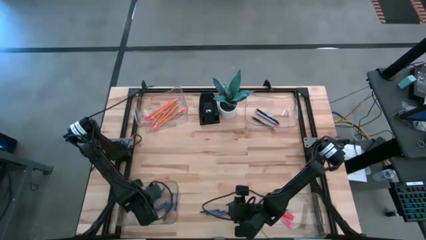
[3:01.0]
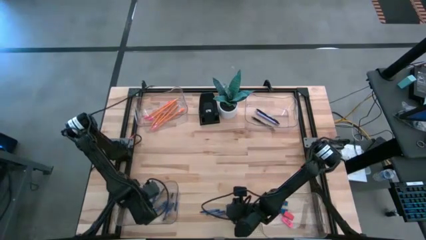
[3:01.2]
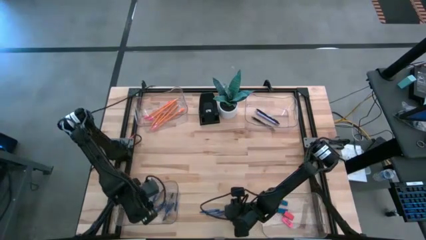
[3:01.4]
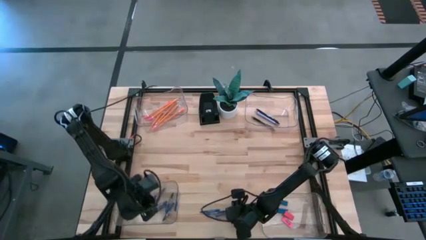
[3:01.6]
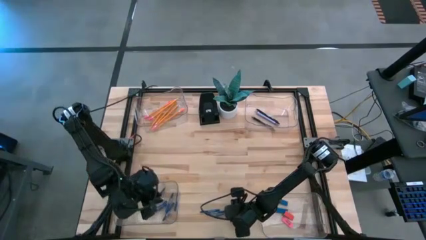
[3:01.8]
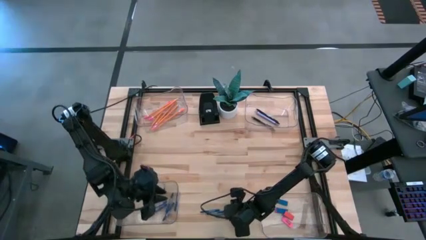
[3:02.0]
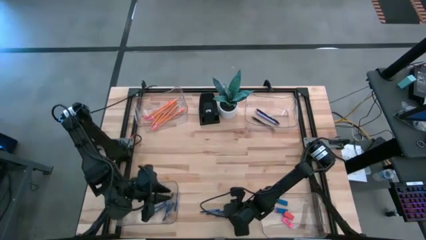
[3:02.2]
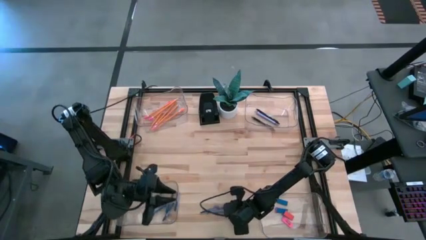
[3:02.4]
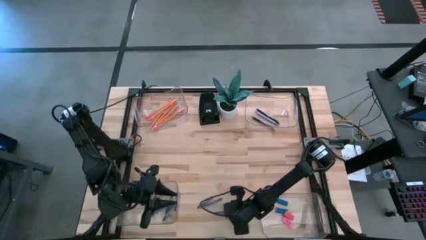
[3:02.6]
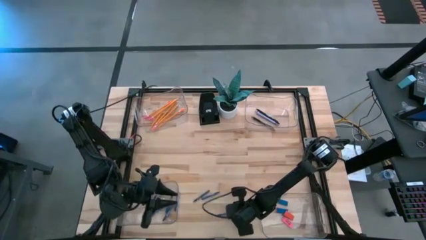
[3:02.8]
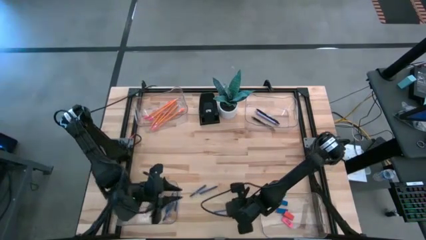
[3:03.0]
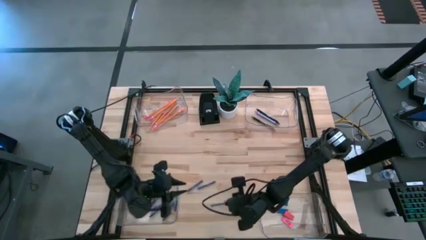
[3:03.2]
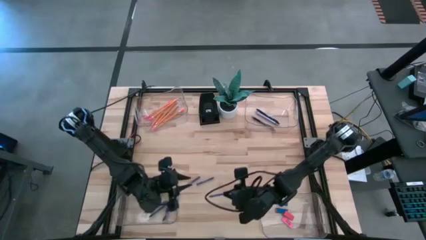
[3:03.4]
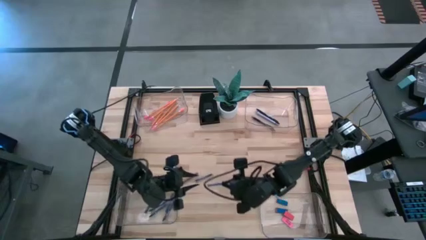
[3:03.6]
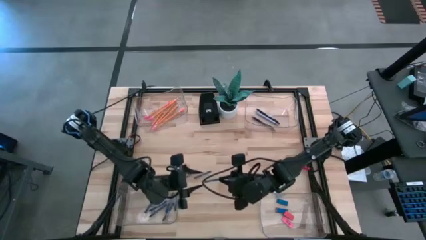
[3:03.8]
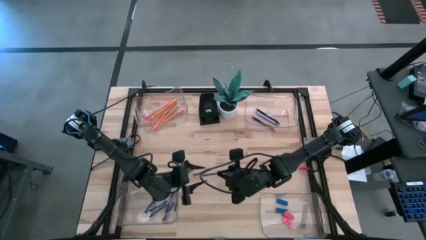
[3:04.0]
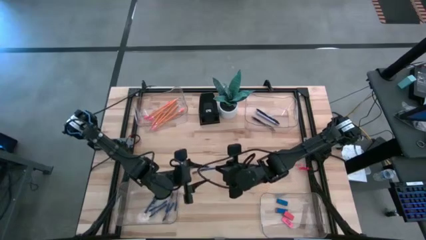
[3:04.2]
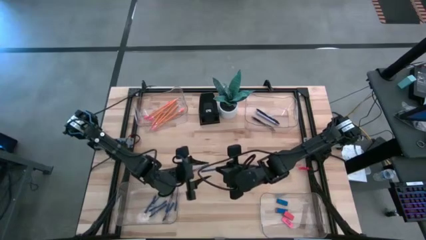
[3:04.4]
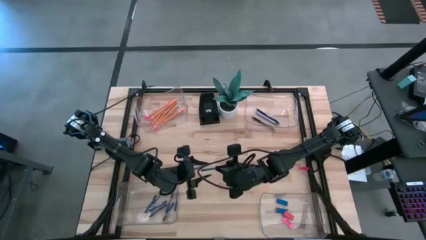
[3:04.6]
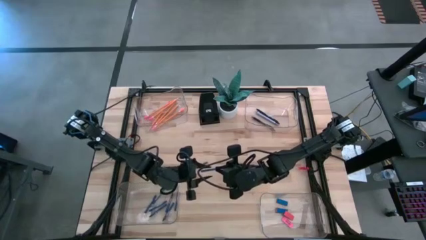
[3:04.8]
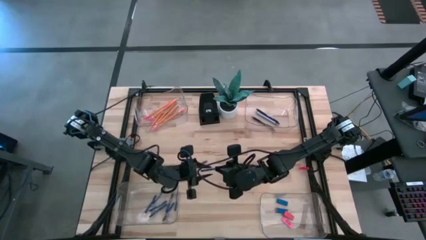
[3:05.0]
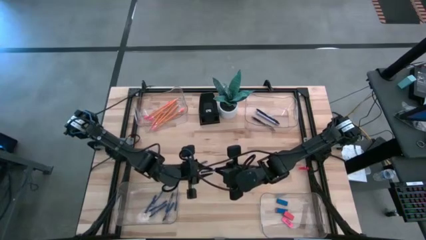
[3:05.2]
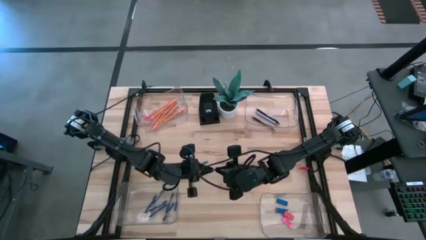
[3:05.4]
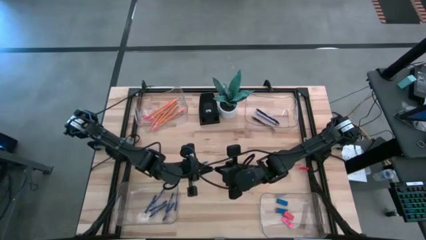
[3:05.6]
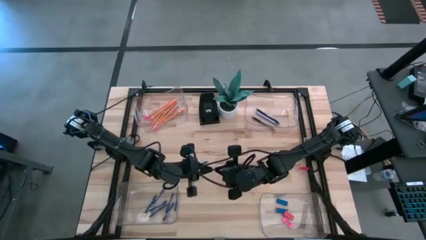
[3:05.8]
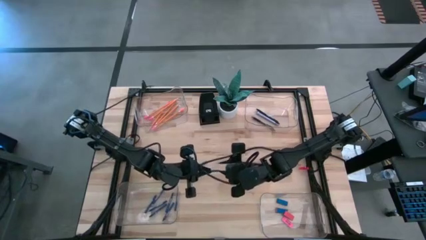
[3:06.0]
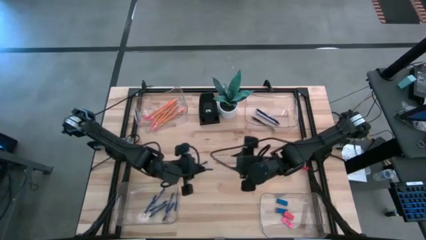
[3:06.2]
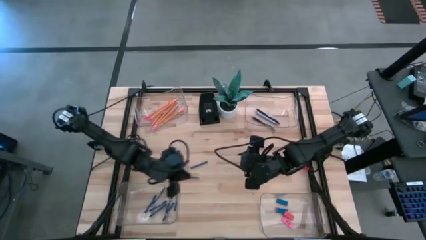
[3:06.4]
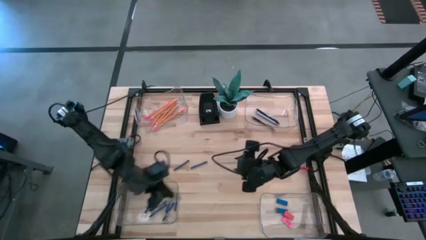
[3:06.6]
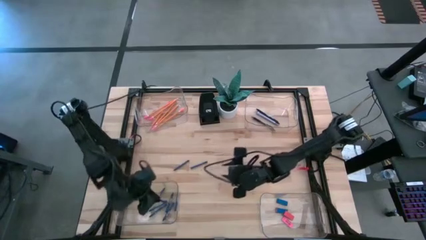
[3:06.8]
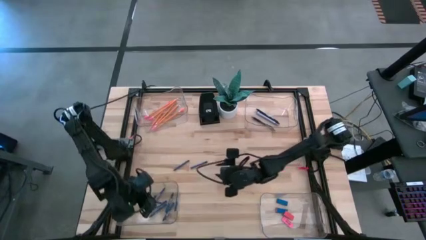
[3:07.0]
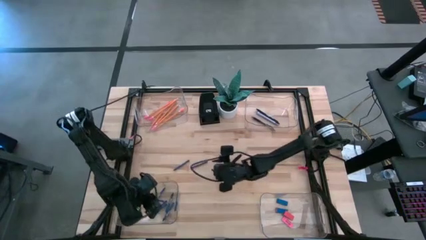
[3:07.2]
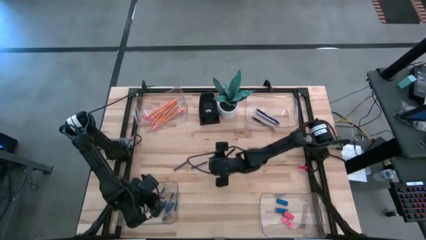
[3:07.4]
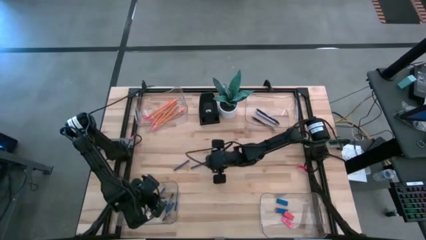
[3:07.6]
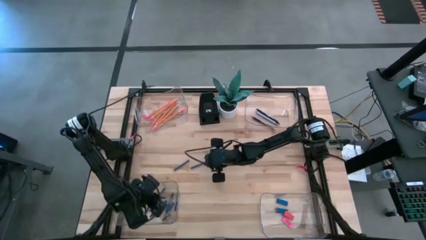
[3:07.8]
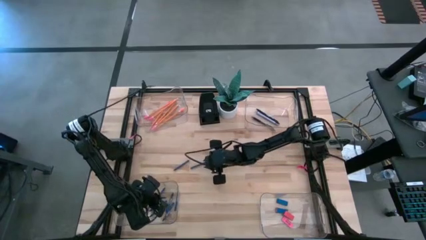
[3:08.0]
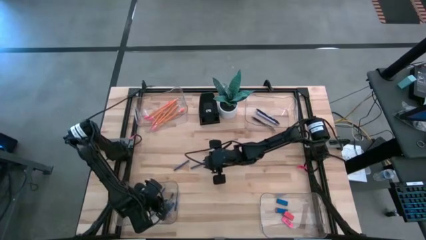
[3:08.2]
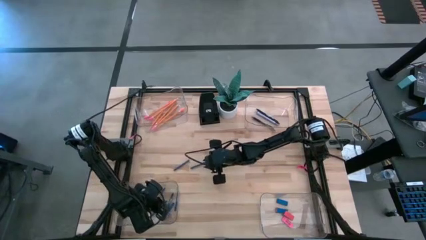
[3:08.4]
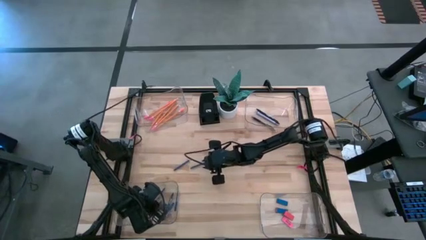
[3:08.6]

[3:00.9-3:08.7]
Task: Sort crayons/erasers/pens/pencils in bins
Put the blue crayon into the bottom left transparent bin

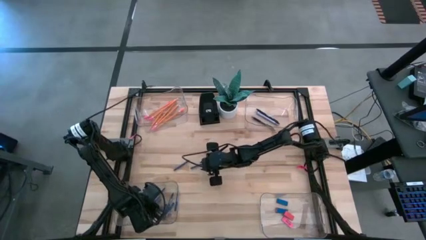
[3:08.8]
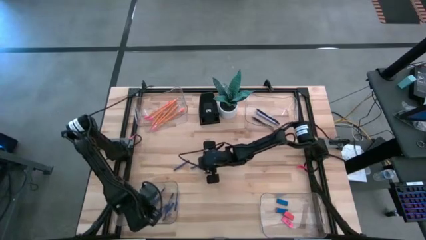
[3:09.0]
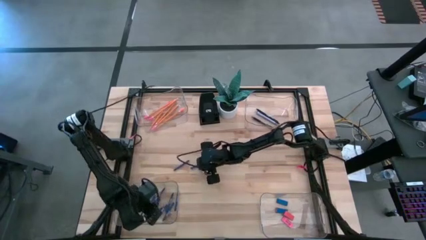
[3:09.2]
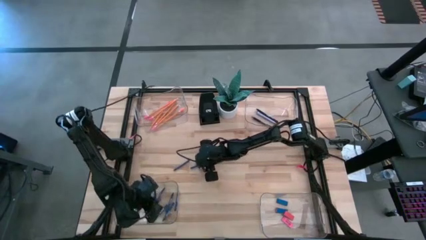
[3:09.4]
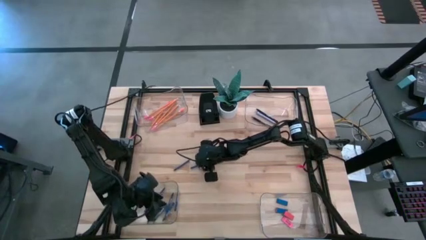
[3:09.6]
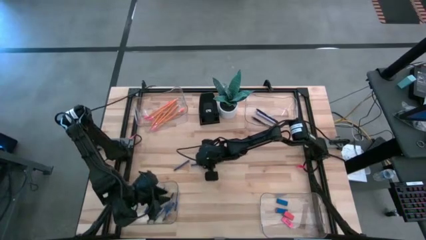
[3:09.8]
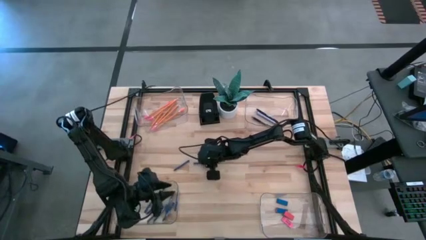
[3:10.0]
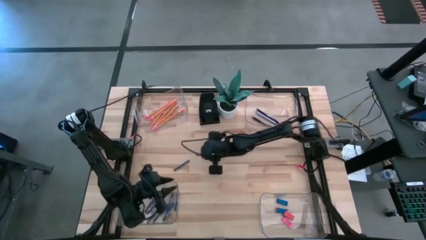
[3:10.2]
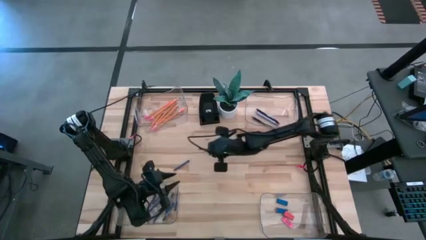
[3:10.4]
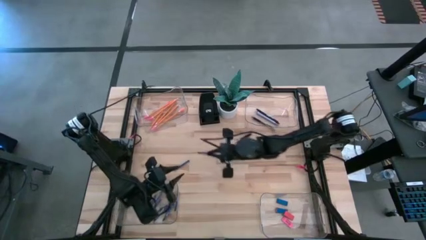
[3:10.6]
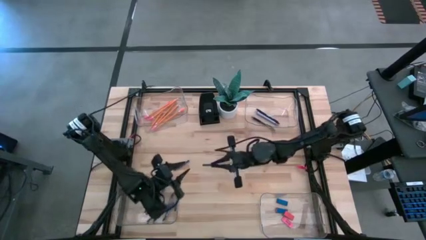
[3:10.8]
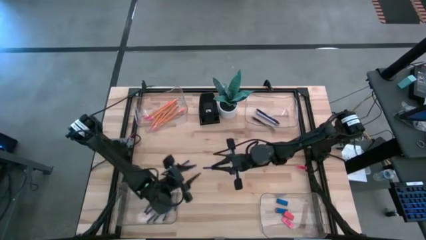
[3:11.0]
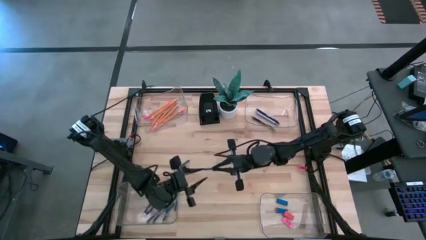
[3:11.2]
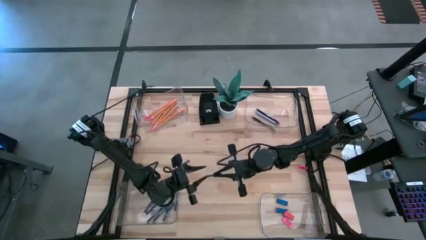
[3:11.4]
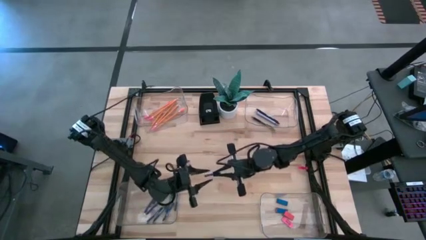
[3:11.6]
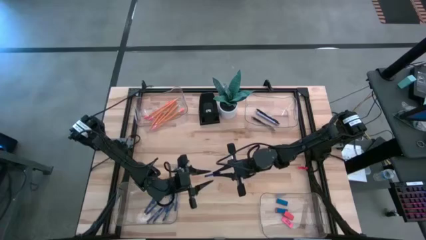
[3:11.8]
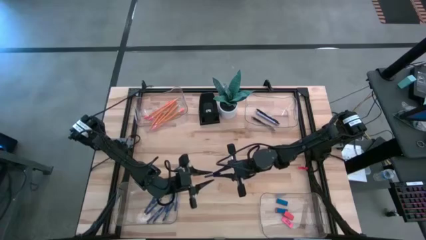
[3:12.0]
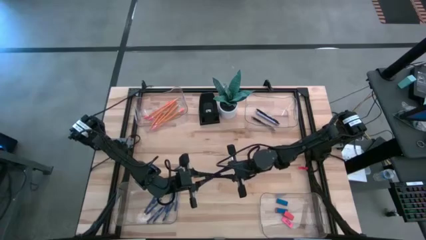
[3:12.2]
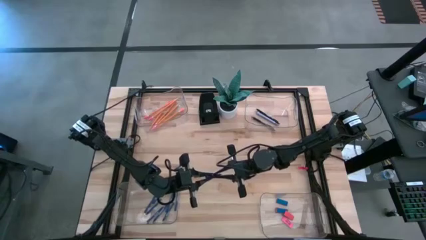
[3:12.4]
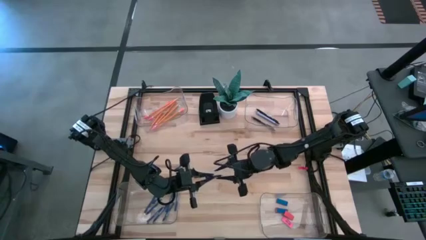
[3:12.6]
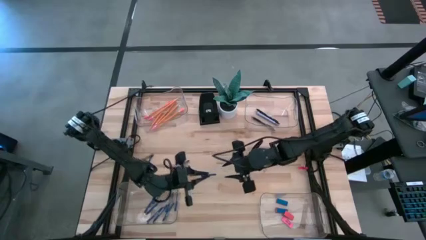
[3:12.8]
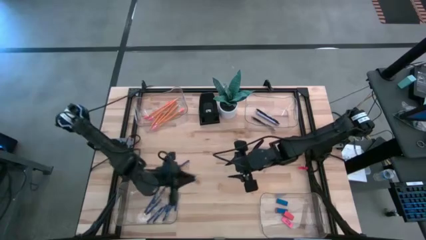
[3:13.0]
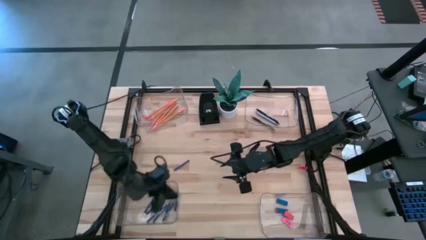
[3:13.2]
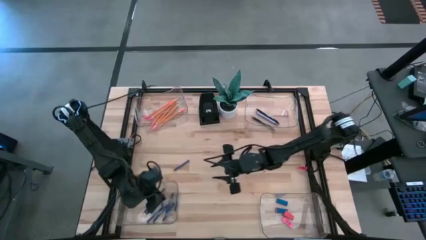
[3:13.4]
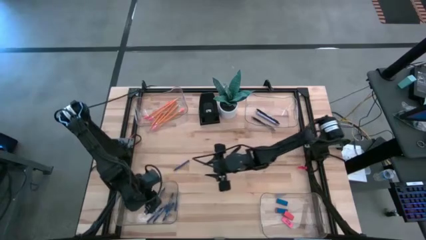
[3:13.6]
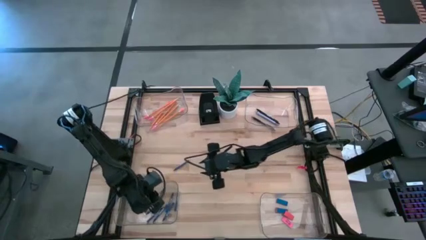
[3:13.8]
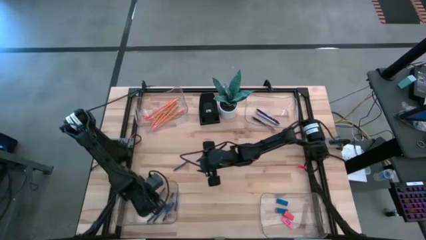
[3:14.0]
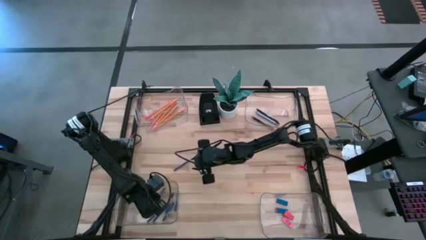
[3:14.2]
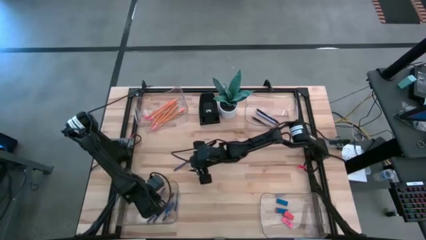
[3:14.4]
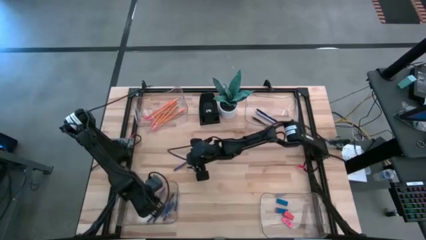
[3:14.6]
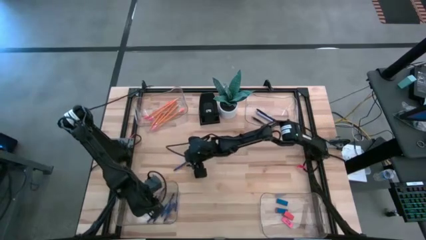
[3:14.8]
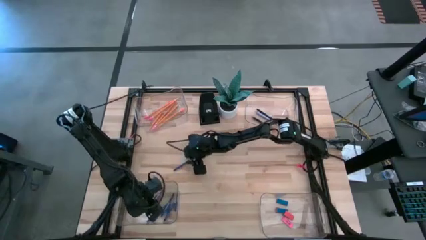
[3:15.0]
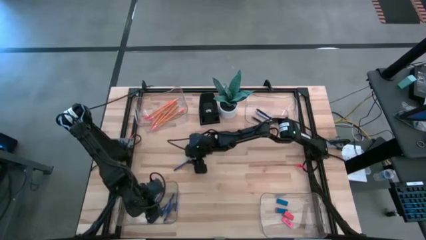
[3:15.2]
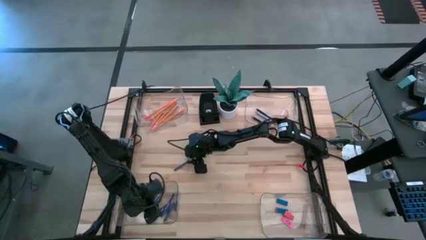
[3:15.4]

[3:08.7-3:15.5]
Put the crayon into the bottom left transparent bin

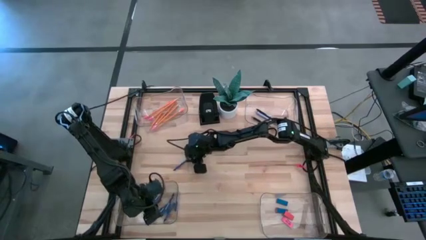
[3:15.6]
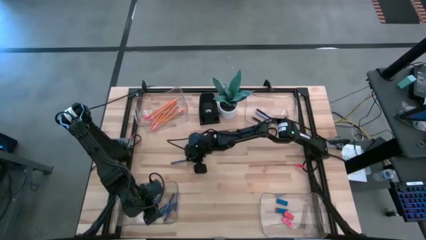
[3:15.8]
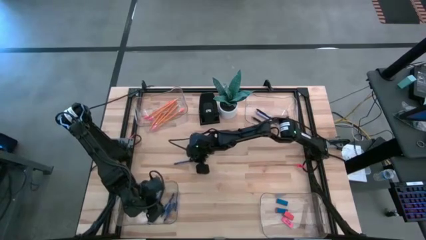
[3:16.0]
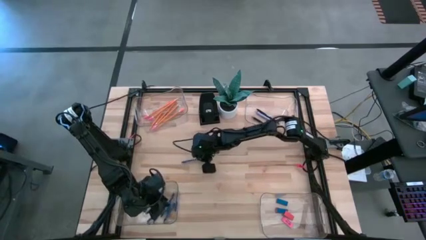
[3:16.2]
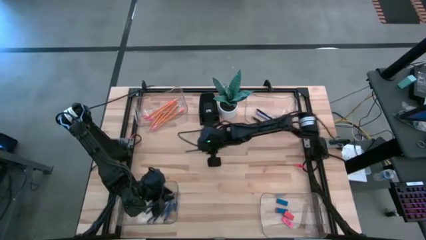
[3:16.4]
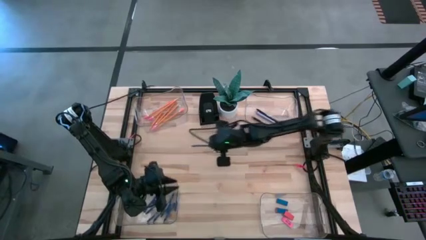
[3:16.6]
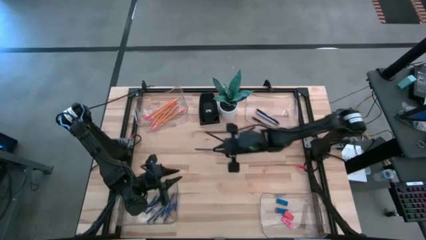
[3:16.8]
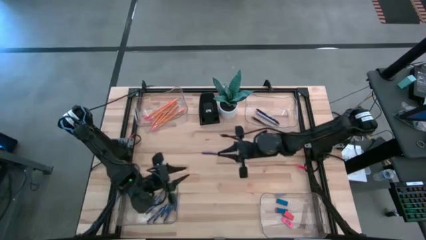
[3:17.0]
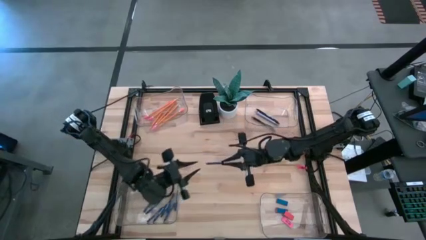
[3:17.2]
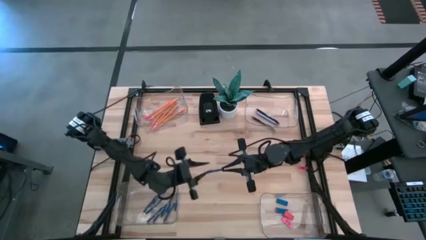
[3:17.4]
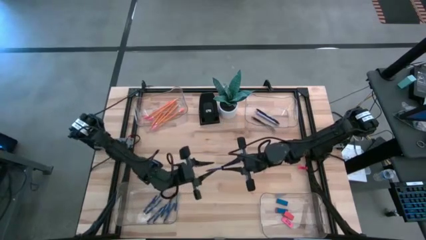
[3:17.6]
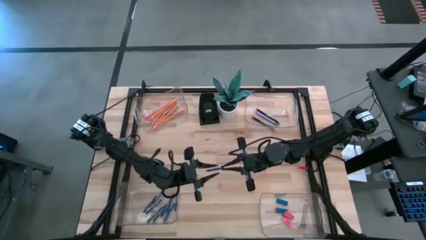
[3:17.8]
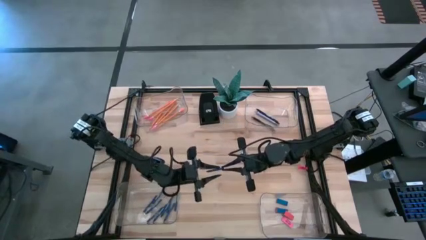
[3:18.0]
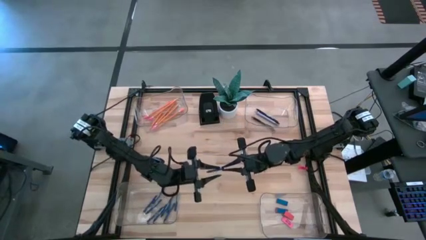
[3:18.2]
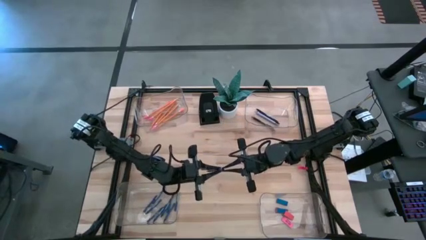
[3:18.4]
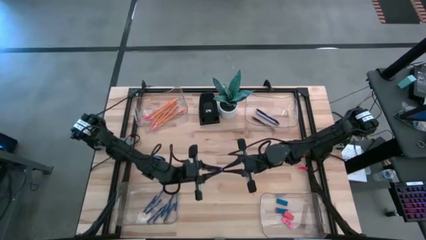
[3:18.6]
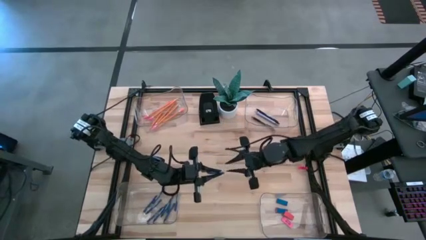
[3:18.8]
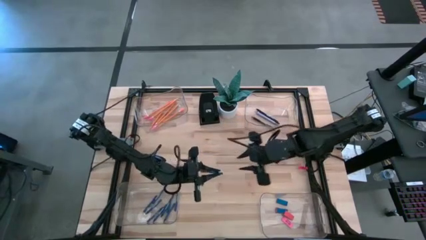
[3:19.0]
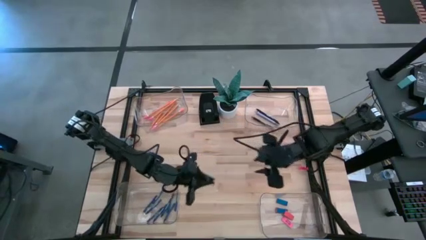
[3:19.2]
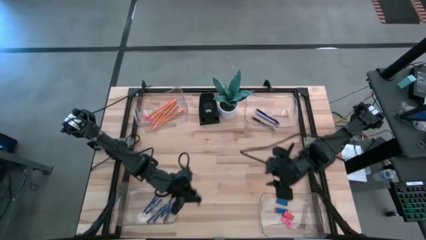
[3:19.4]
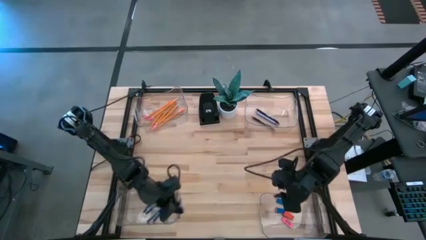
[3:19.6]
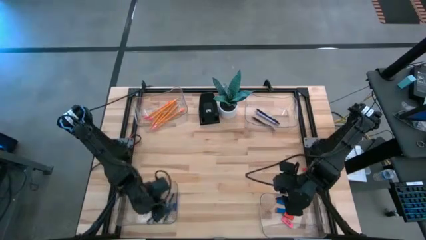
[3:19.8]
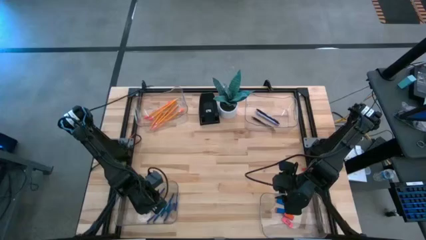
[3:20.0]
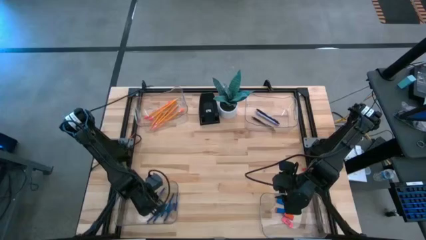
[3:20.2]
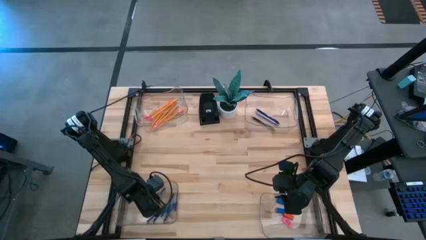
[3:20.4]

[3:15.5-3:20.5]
Put the blue crayon into the bottom left transparent bin
